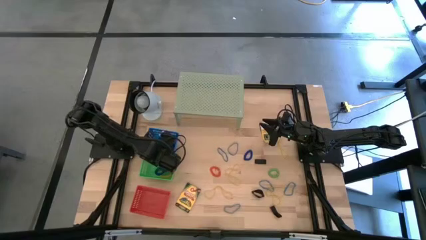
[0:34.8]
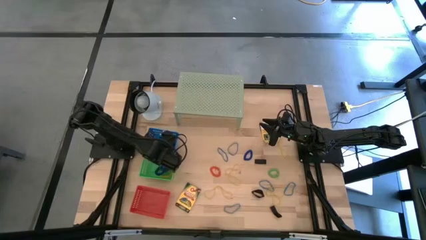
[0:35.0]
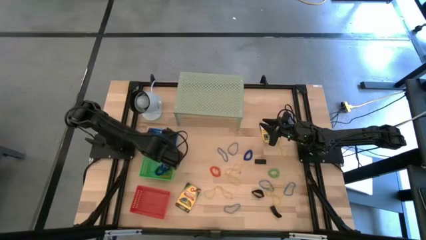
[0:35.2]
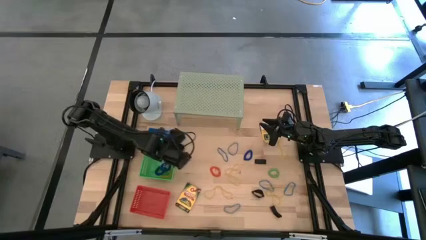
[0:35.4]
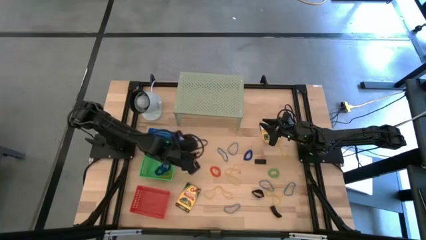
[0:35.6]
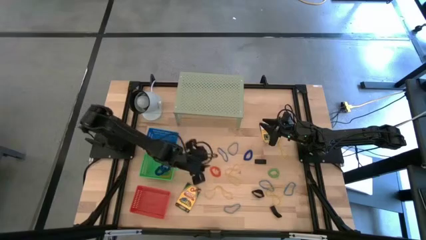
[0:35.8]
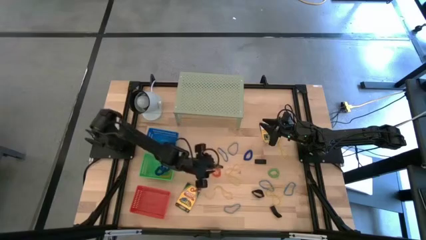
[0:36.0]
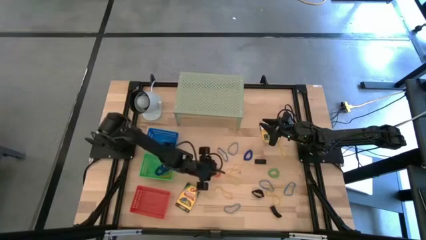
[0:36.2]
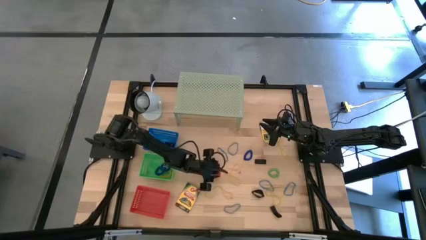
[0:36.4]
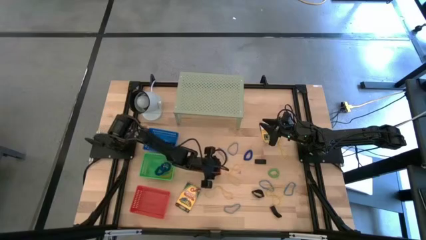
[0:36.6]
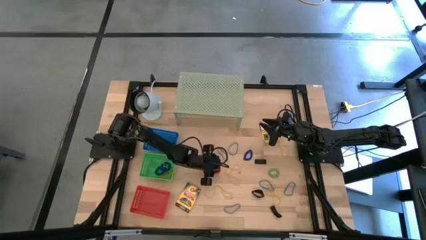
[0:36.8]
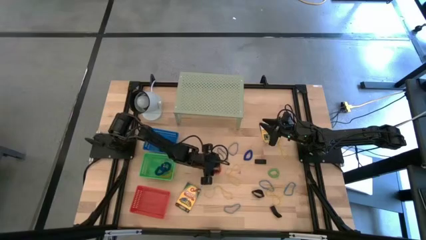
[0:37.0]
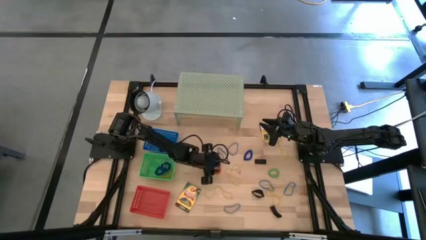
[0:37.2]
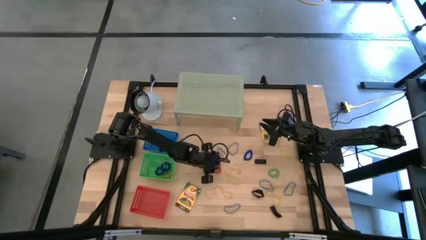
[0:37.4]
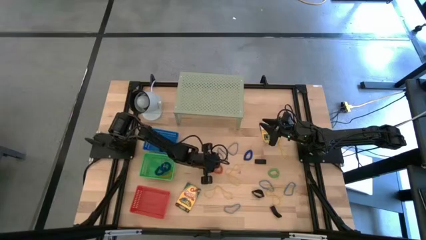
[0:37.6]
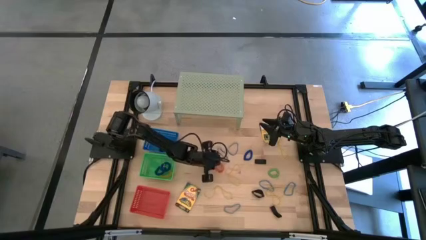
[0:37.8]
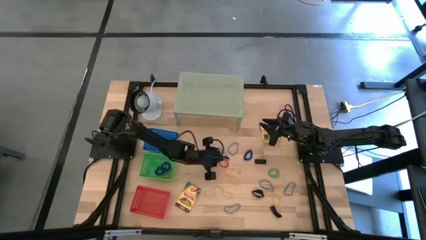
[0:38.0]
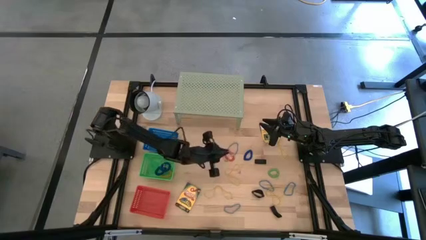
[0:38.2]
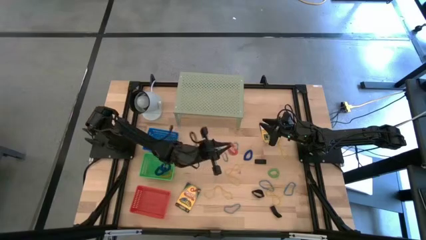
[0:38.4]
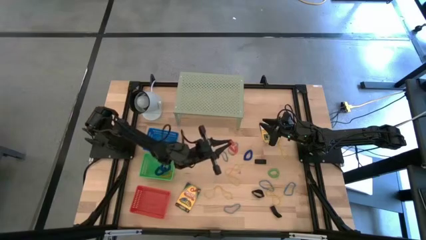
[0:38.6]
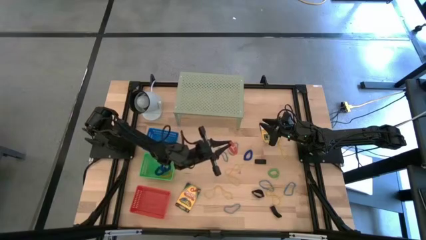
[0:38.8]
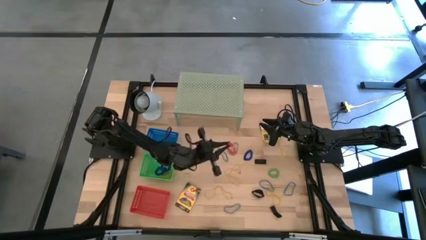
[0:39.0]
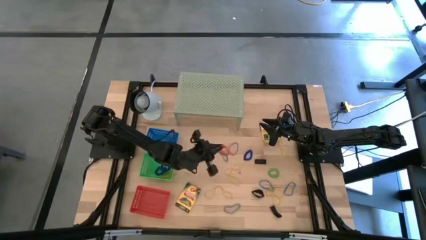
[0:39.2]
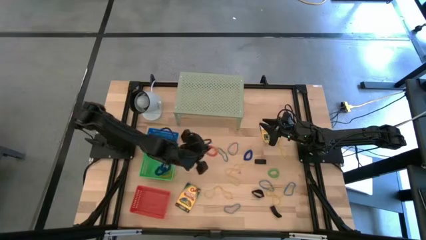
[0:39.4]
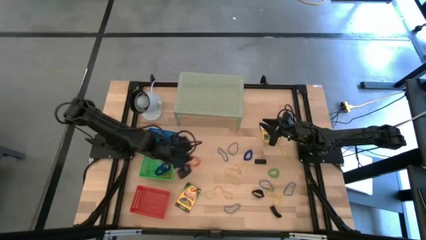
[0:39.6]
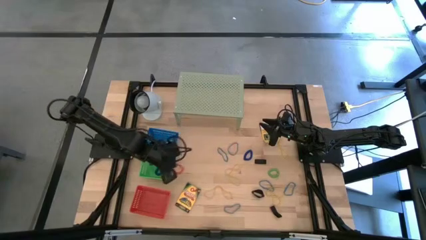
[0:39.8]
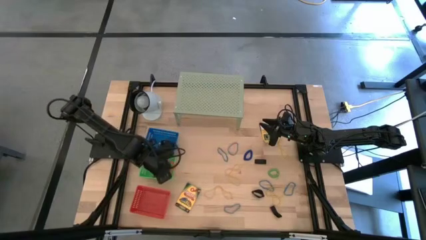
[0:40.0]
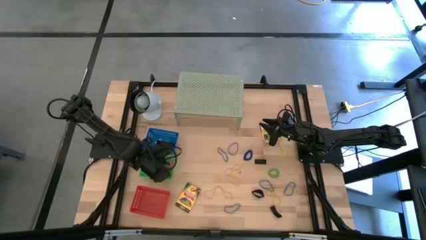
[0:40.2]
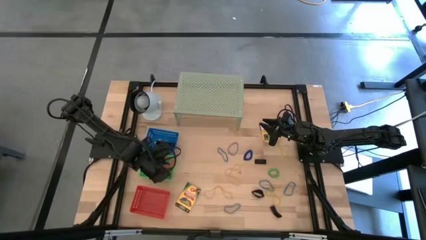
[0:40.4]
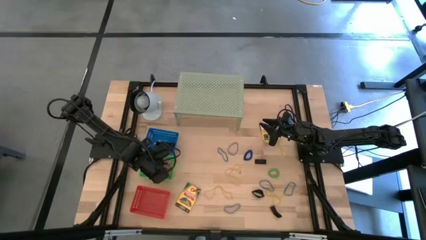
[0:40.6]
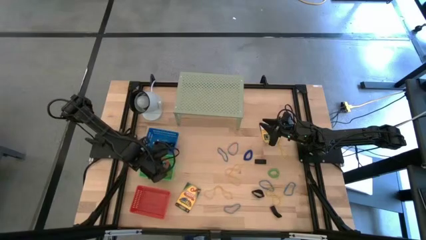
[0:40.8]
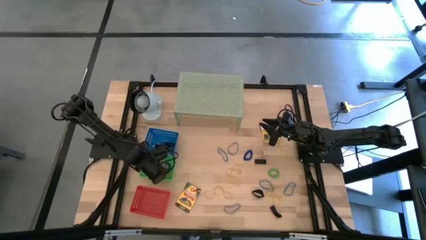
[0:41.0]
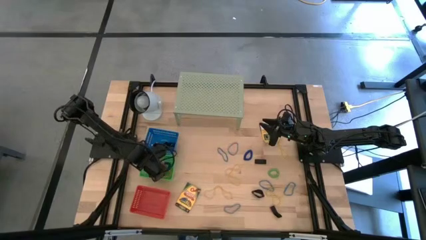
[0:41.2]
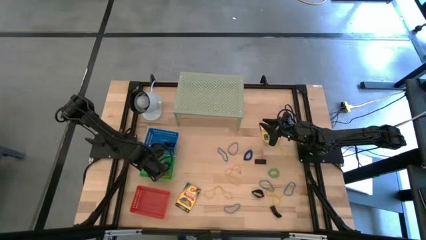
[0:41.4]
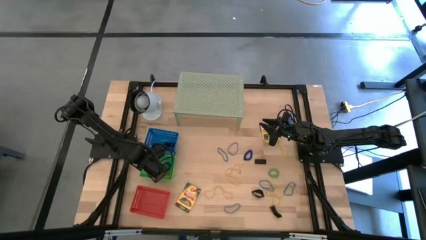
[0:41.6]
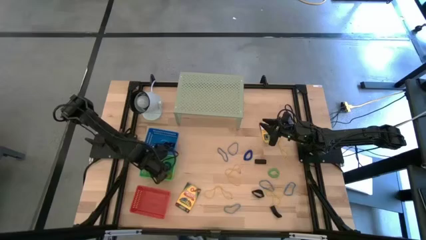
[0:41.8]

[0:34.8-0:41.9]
Task: Pick & Place Office Desk Supplies
Put the orange spring keychain into the green bin

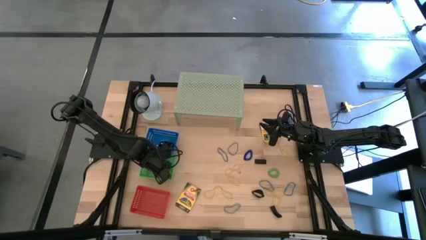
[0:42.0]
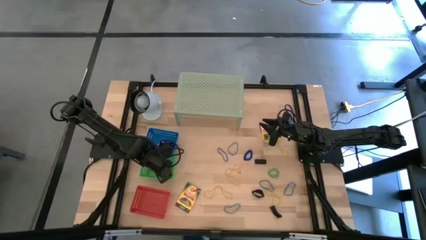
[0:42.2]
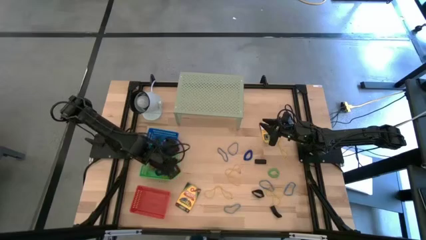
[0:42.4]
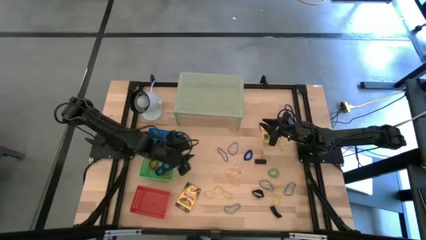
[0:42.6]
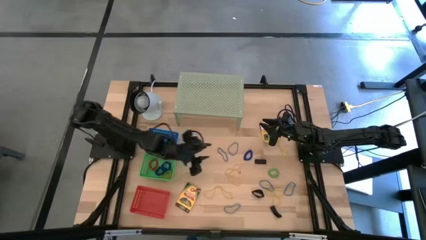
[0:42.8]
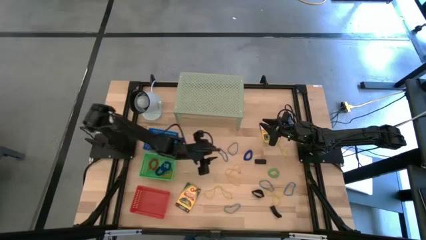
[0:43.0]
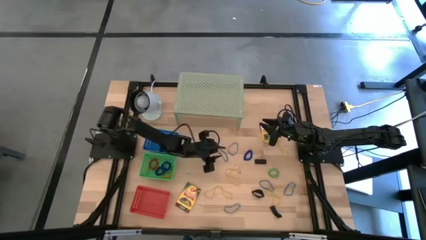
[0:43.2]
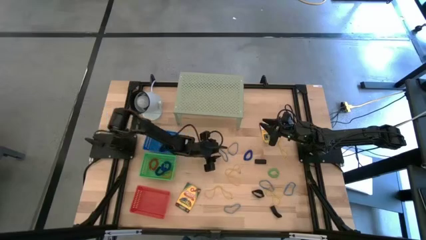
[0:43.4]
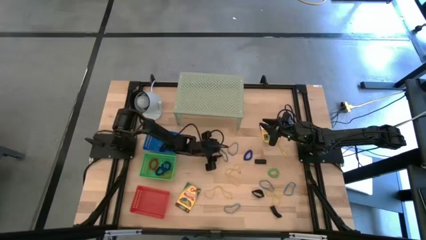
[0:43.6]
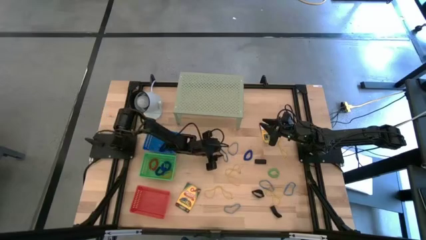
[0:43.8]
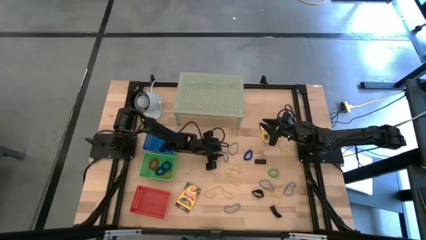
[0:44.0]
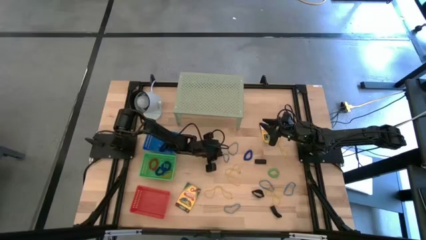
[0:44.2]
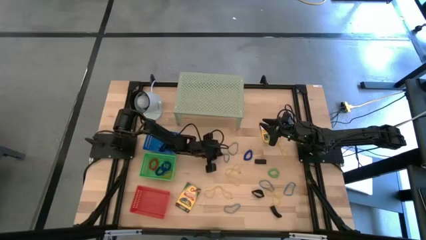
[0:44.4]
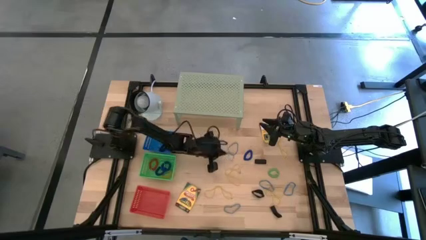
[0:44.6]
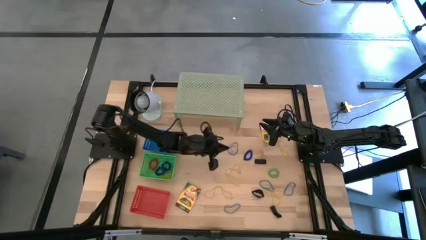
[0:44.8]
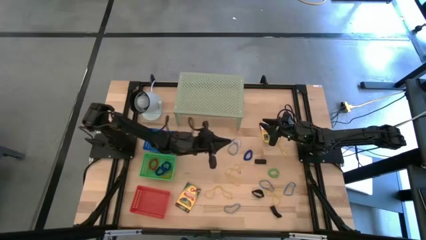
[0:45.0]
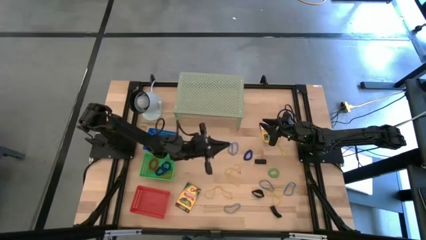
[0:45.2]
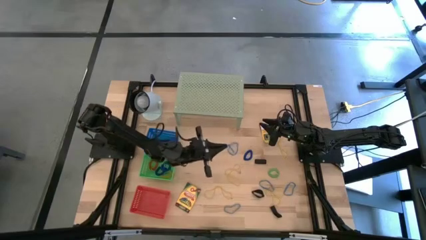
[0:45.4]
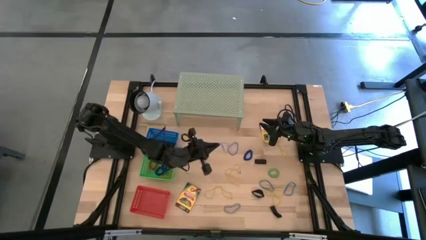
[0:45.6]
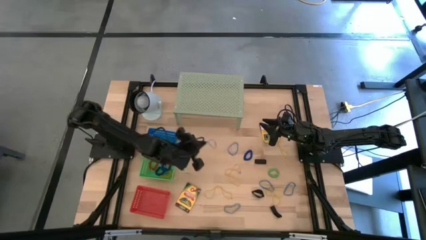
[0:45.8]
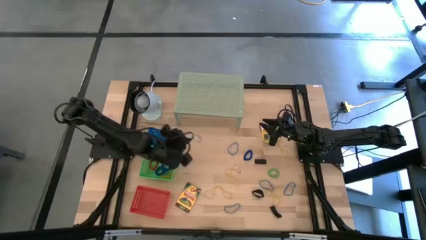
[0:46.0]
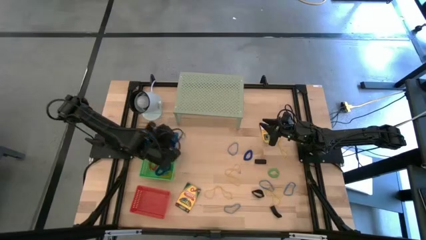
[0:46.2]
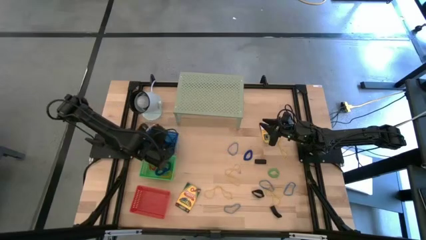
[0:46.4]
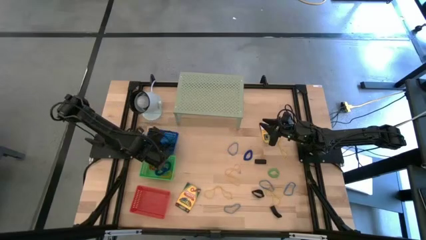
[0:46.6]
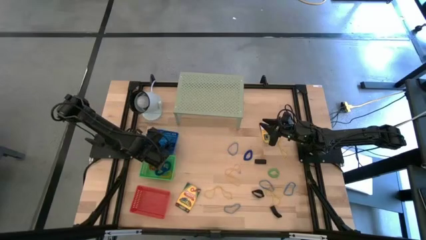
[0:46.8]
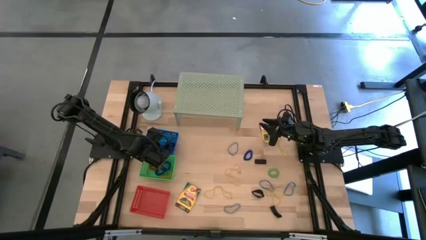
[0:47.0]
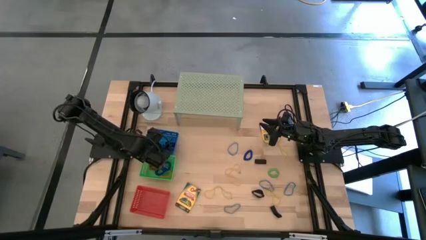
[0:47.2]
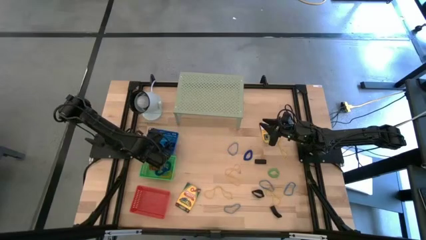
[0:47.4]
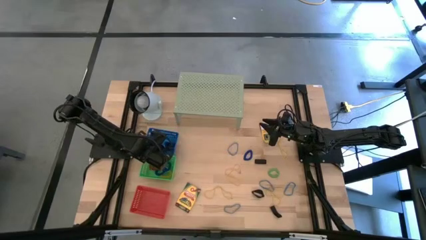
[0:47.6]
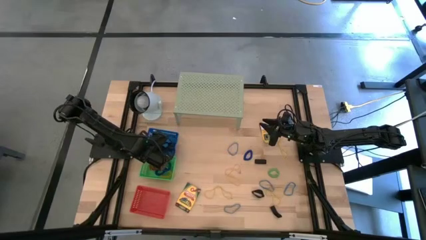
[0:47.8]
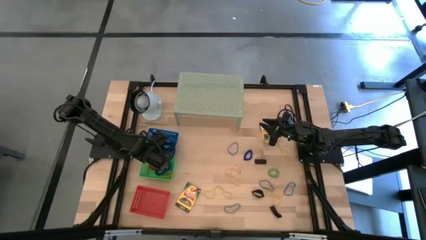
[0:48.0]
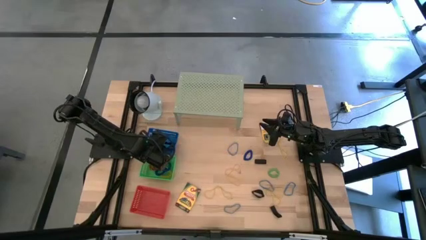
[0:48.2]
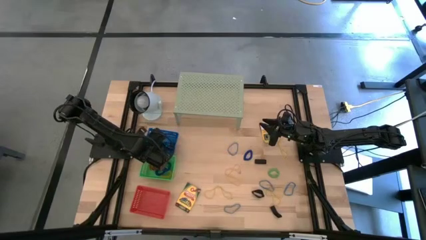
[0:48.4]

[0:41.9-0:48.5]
Put the blue rubber band into the blue bin

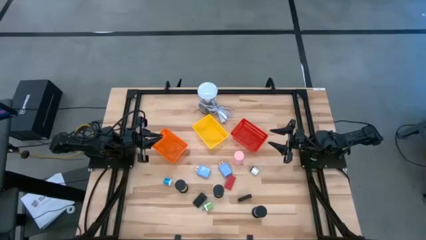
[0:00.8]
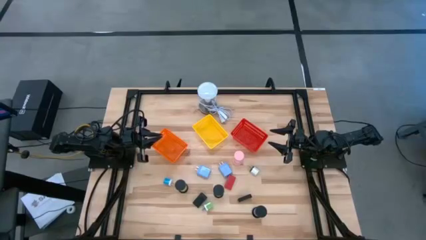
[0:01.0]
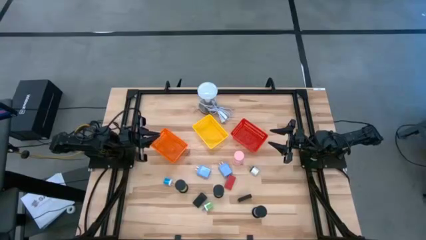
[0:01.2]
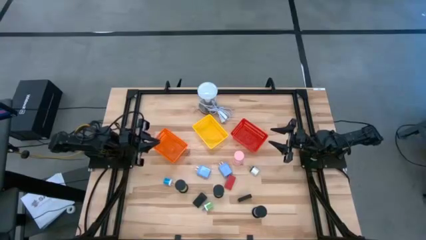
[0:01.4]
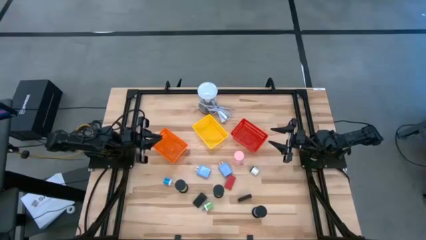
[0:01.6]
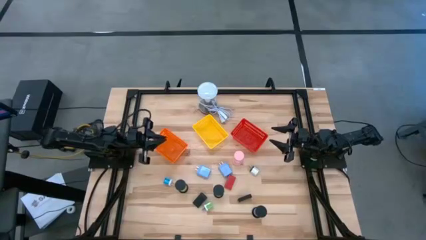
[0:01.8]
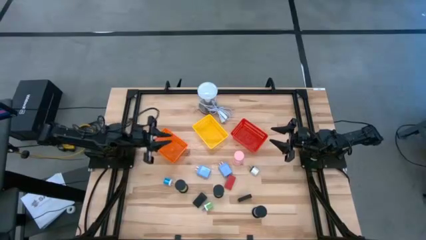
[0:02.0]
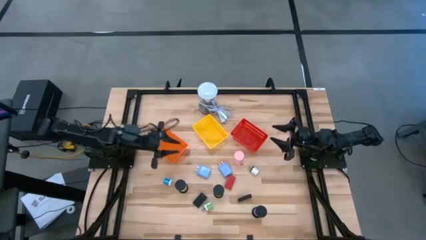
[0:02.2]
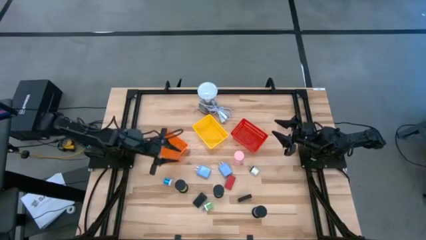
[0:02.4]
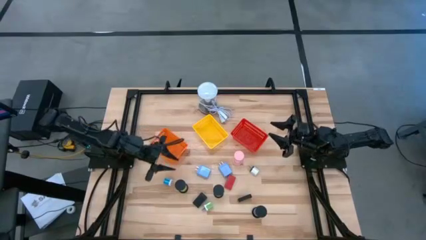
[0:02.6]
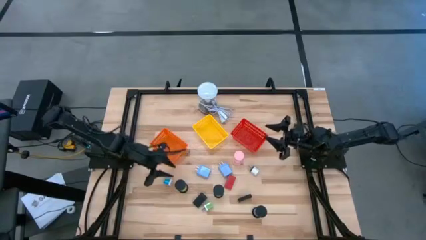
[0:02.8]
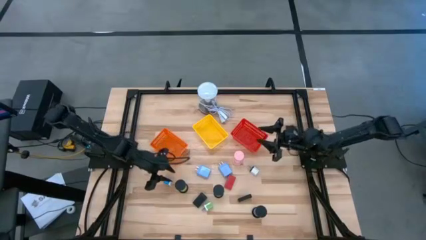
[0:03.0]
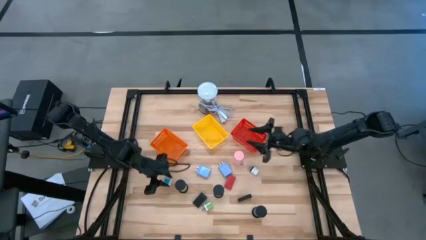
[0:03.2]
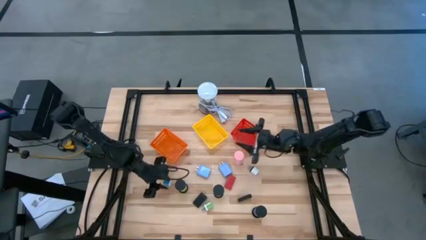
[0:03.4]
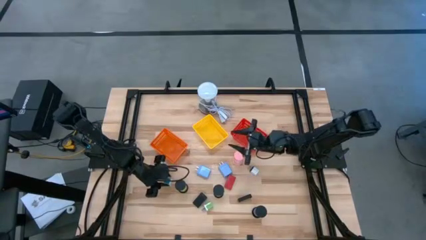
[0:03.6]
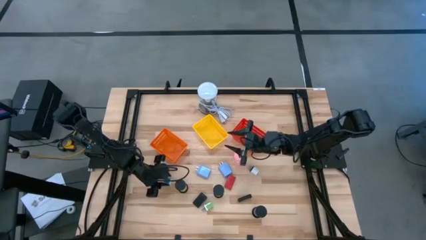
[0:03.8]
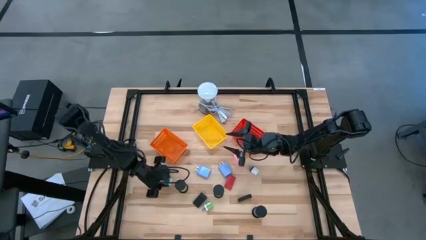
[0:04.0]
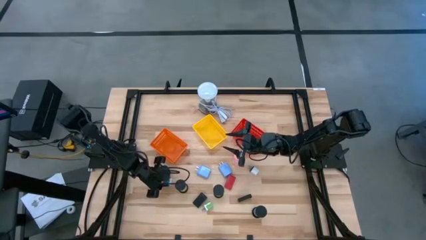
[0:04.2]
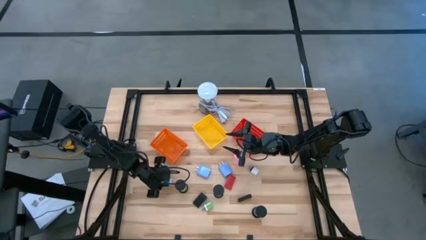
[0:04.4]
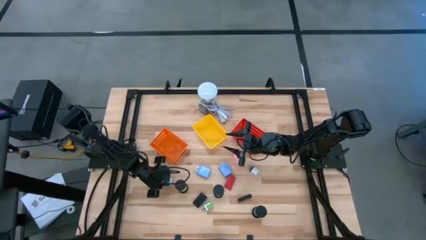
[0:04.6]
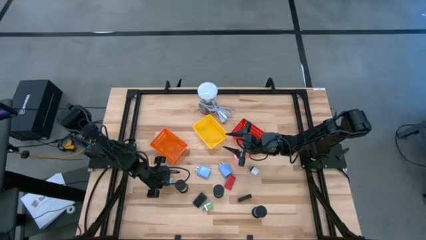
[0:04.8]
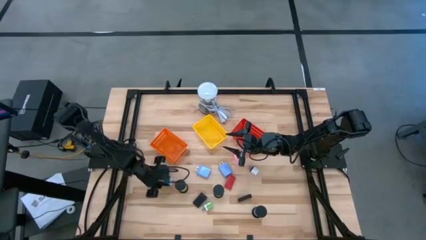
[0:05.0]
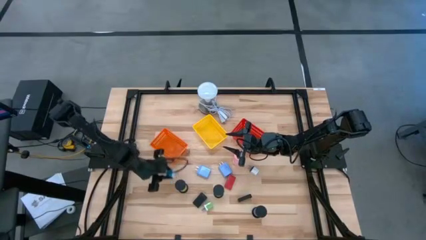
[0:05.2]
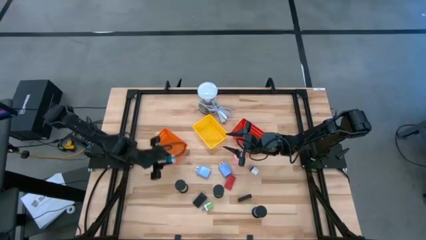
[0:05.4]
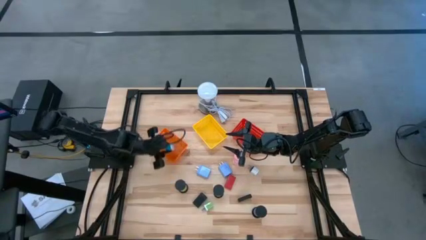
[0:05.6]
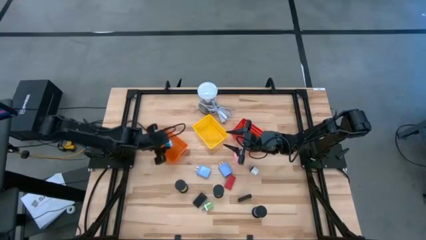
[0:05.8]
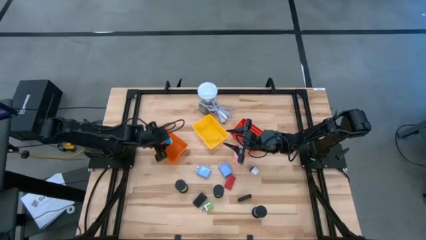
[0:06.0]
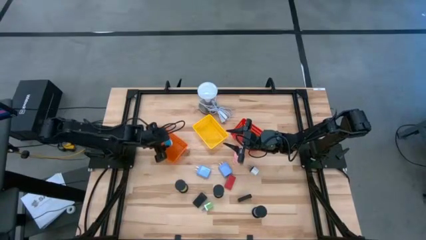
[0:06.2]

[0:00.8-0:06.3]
Task: Pick & Place Office items
Put the small blue charger adapter into the orange basket
